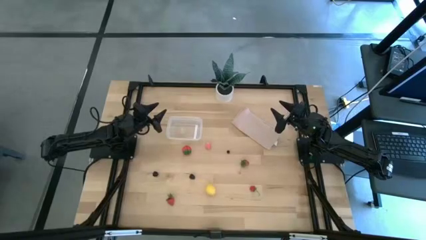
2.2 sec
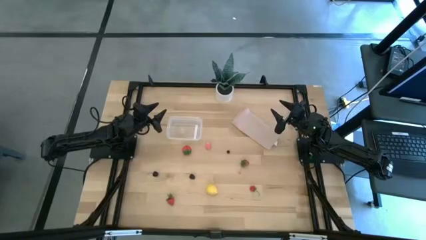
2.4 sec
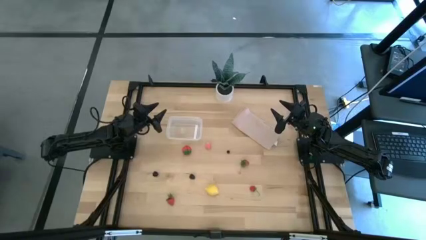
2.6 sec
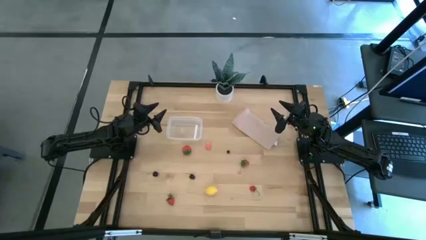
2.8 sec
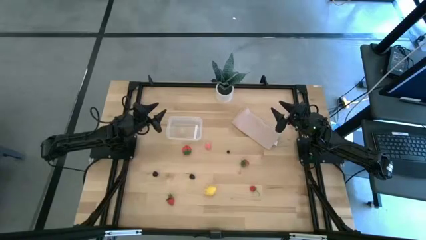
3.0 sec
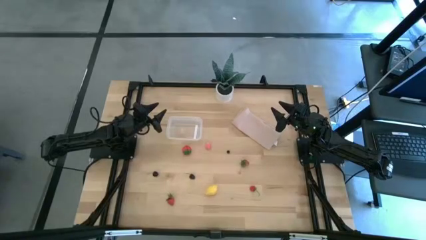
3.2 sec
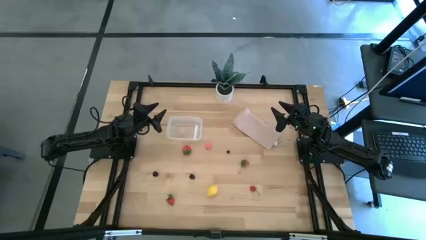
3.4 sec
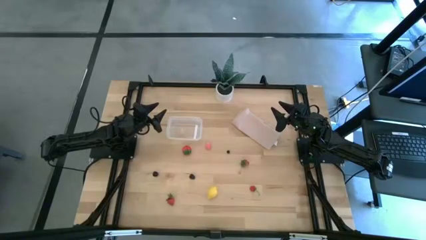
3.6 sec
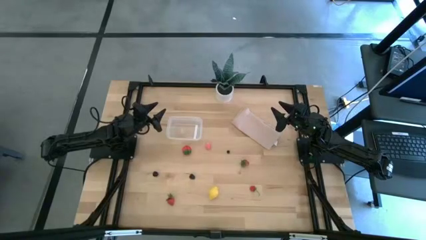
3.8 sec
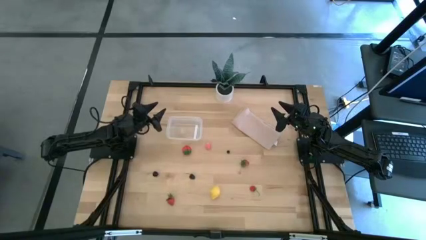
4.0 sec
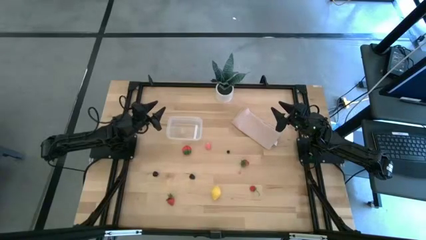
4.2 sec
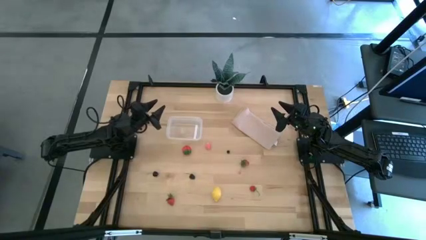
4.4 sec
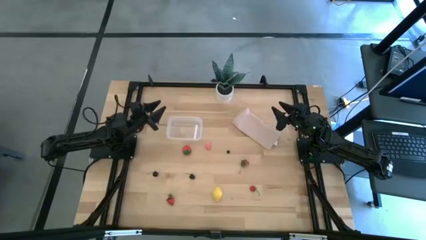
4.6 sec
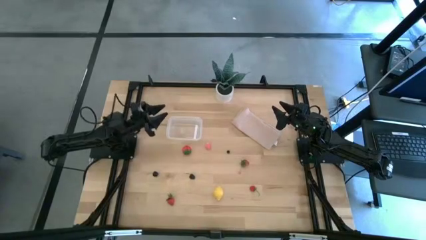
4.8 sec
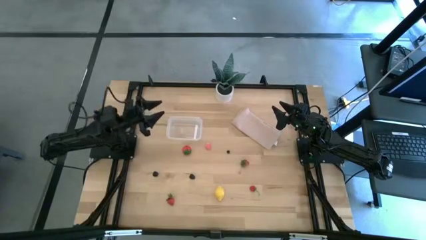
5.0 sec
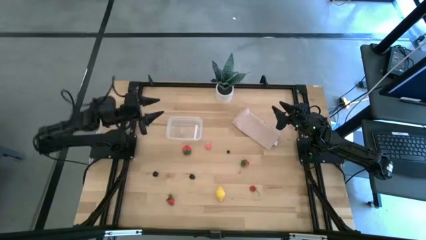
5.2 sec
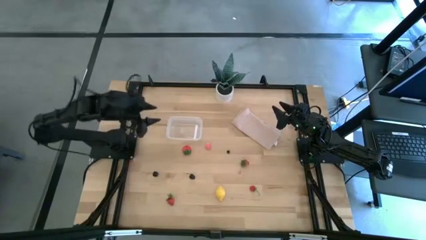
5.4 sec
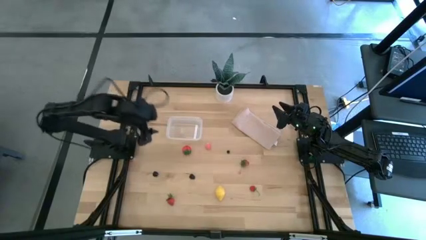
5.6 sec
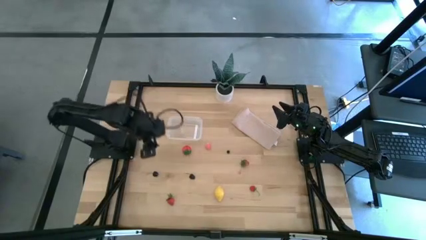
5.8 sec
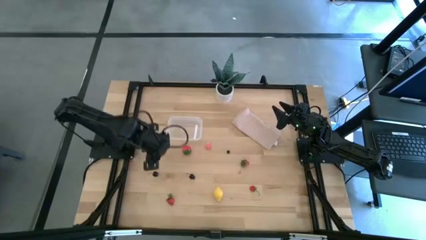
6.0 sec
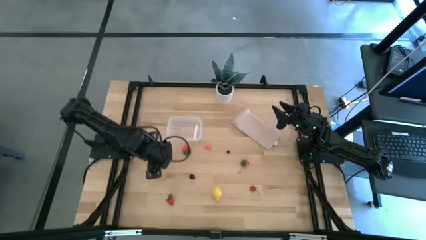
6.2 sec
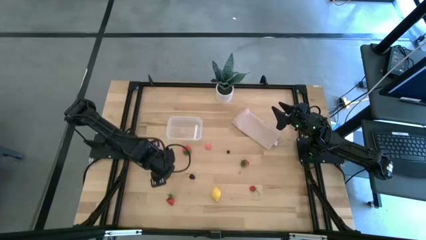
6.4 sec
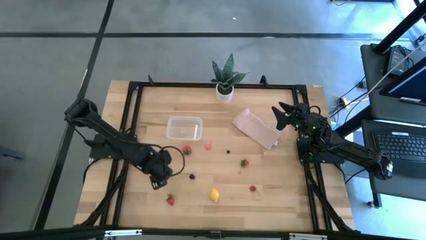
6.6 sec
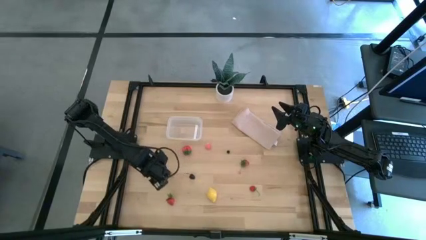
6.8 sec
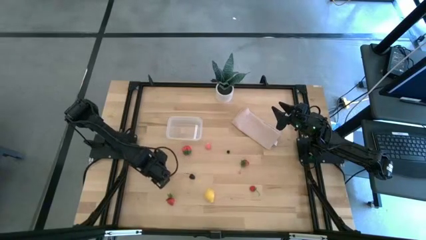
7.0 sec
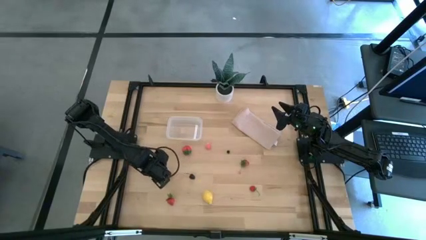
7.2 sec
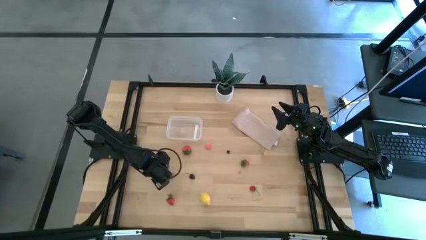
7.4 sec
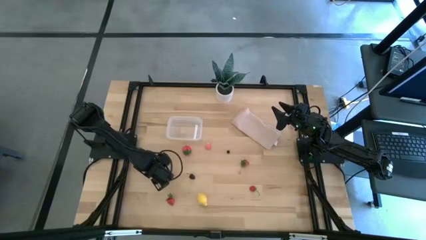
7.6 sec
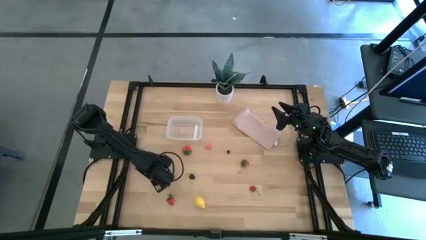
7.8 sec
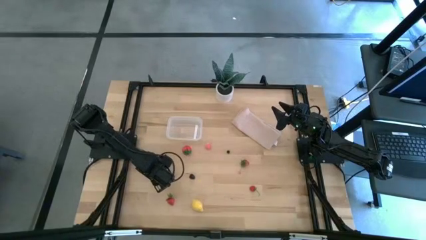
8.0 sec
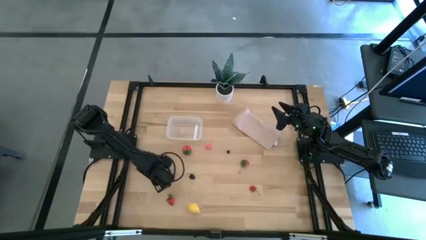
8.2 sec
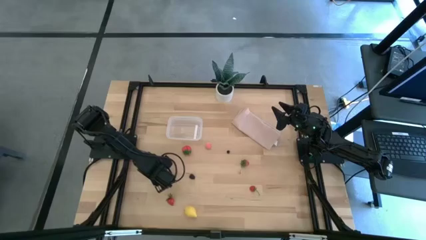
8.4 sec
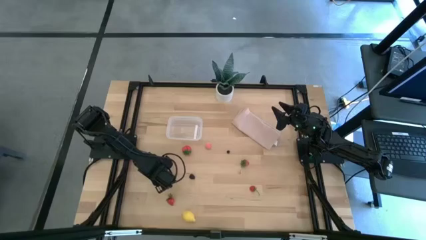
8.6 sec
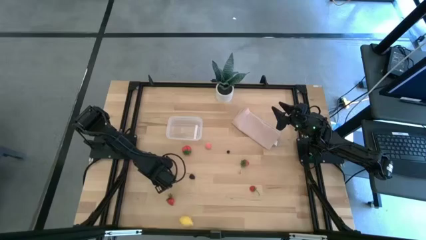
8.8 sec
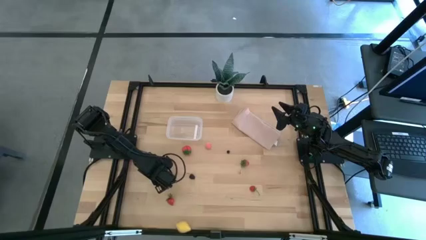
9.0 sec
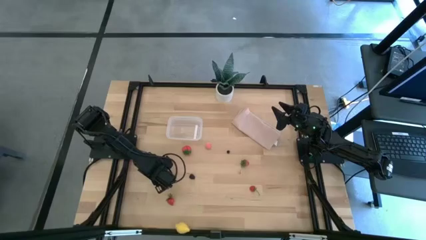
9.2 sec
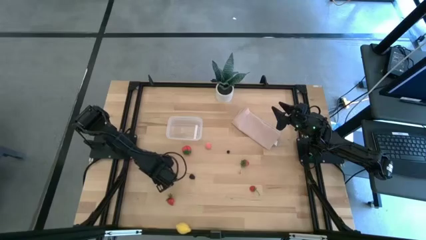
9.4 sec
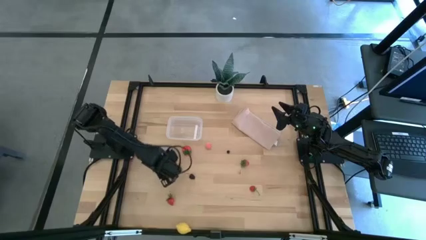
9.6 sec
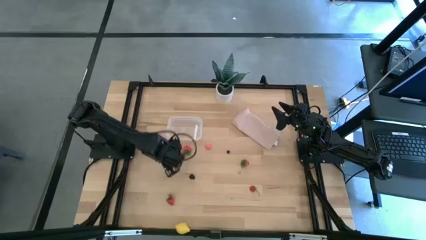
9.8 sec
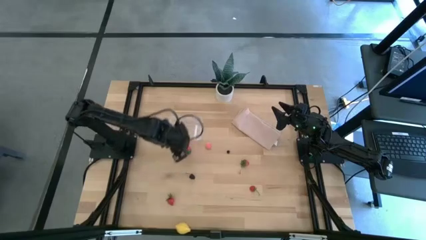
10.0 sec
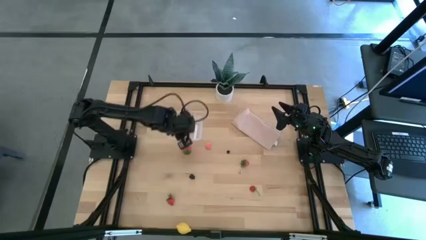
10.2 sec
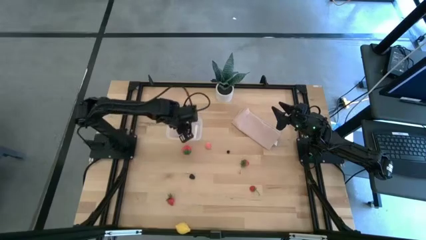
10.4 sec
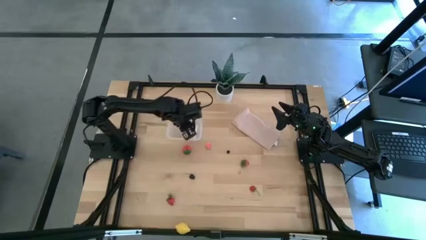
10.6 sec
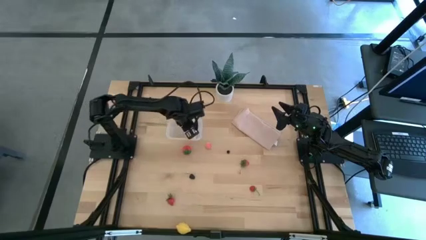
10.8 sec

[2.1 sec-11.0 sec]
Task: Pick and placing Produce into tupperware
Put the black cherry into the transparent container

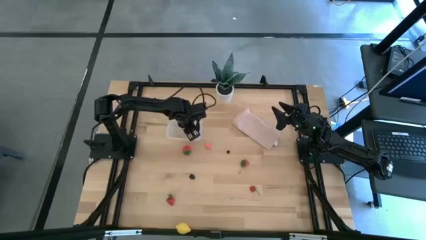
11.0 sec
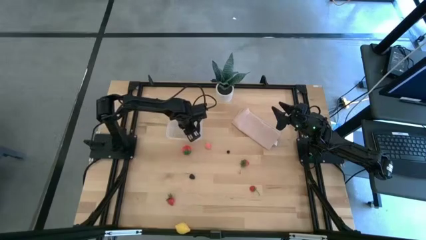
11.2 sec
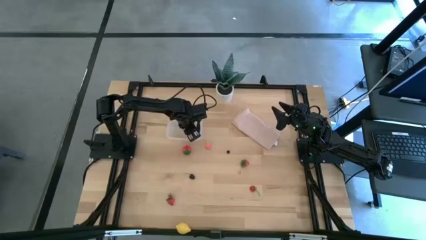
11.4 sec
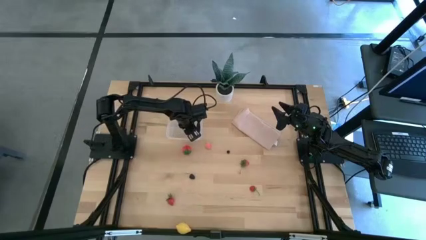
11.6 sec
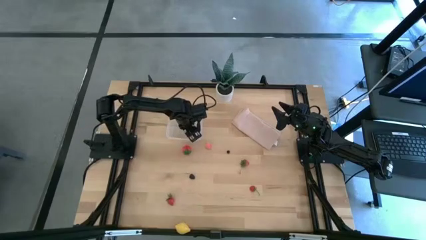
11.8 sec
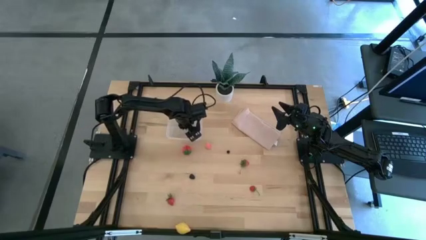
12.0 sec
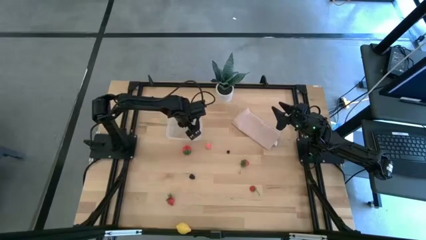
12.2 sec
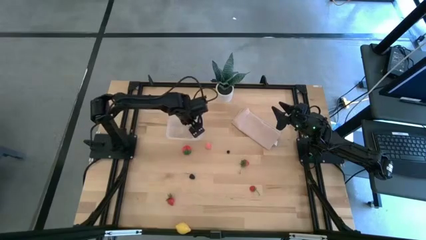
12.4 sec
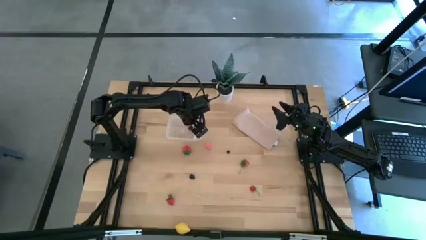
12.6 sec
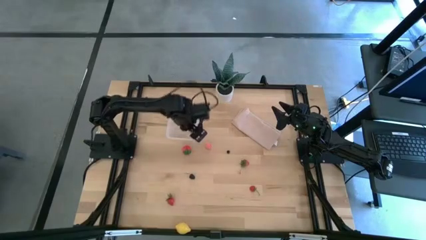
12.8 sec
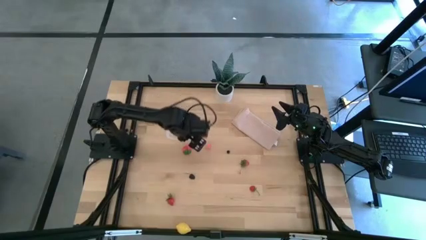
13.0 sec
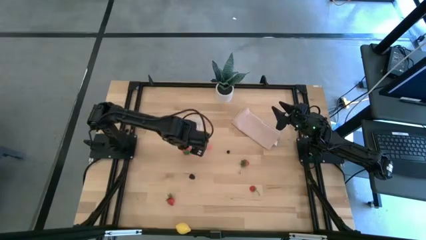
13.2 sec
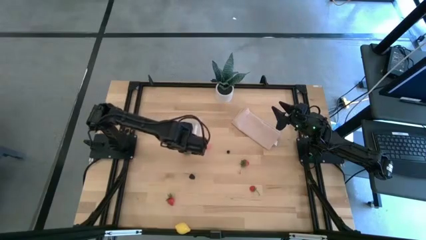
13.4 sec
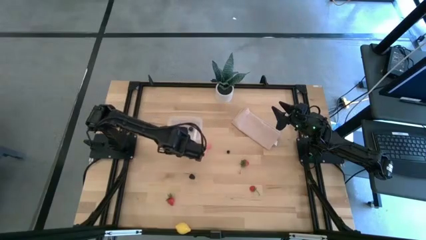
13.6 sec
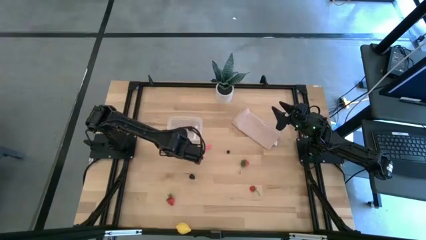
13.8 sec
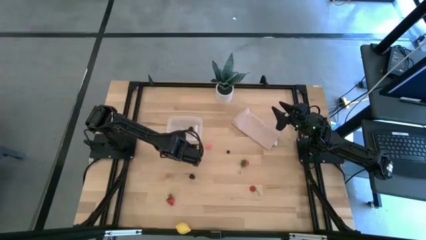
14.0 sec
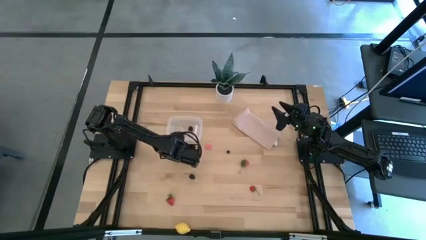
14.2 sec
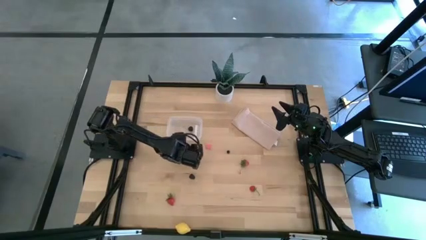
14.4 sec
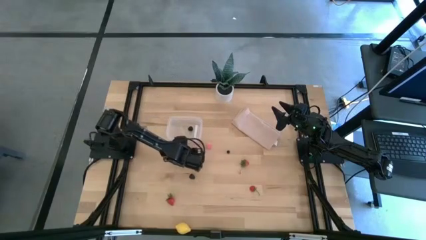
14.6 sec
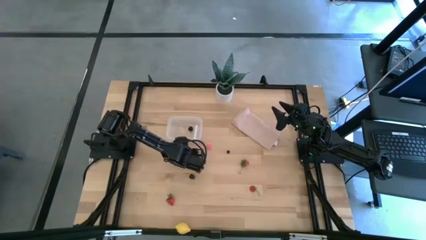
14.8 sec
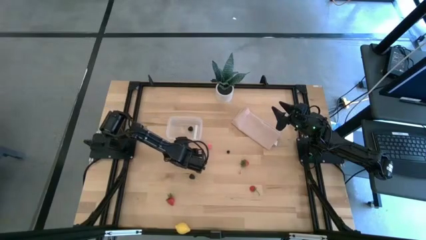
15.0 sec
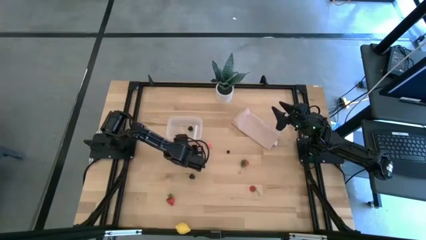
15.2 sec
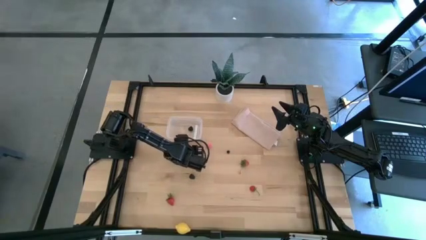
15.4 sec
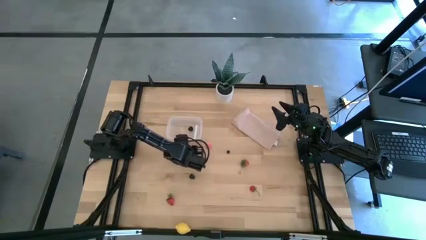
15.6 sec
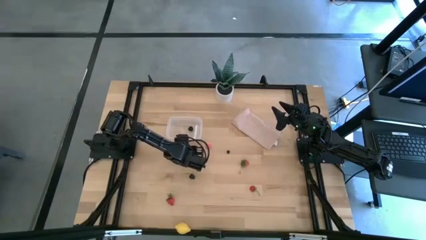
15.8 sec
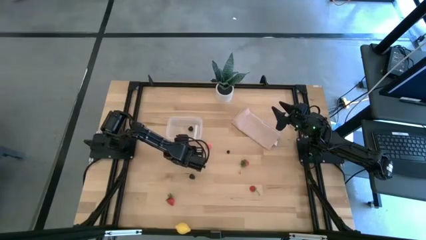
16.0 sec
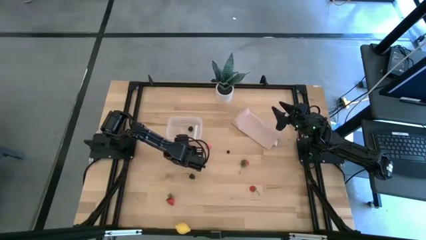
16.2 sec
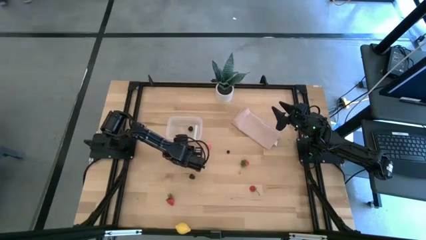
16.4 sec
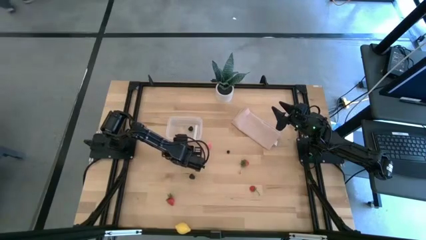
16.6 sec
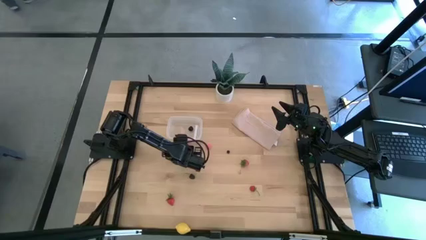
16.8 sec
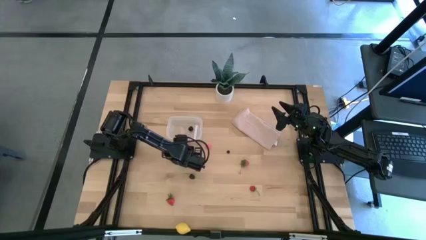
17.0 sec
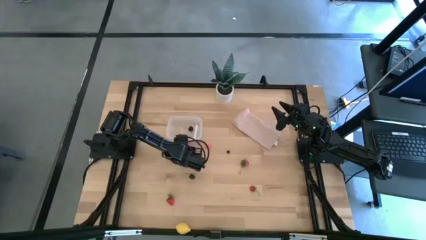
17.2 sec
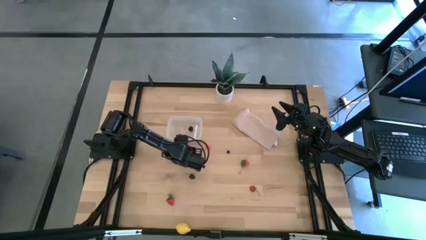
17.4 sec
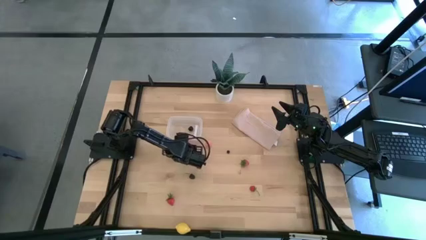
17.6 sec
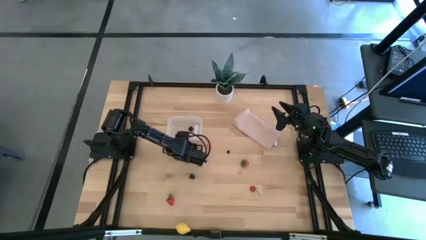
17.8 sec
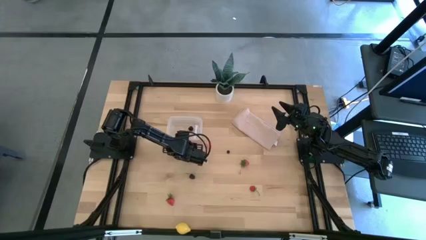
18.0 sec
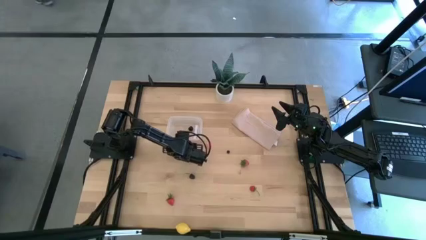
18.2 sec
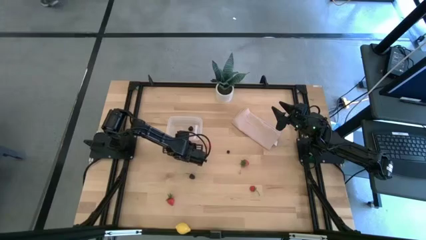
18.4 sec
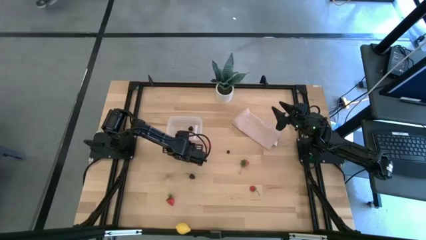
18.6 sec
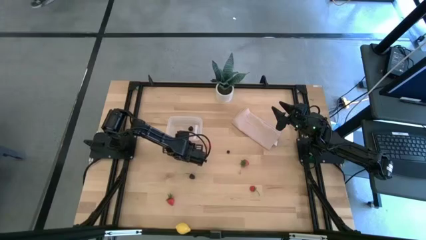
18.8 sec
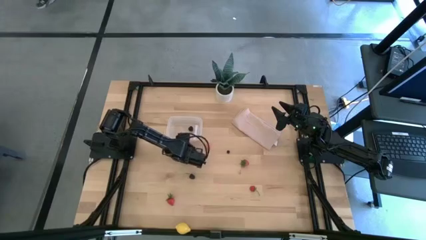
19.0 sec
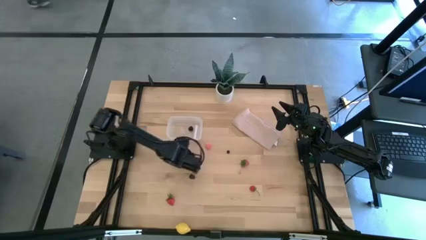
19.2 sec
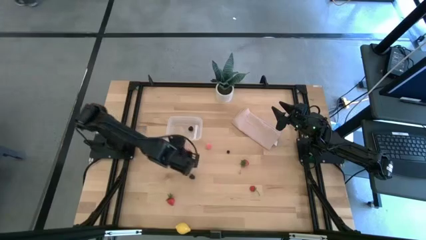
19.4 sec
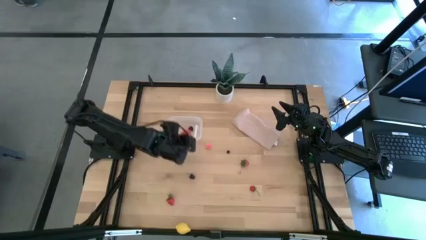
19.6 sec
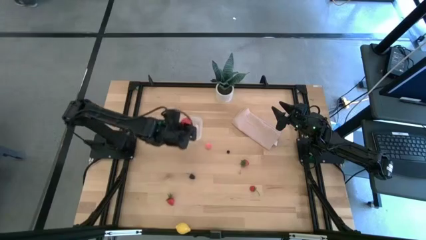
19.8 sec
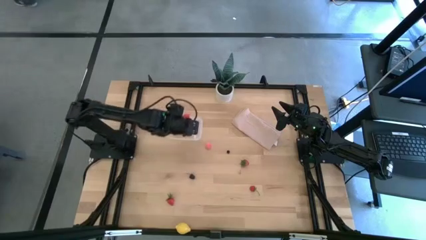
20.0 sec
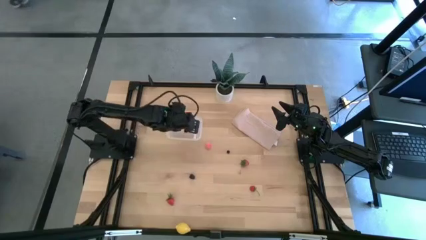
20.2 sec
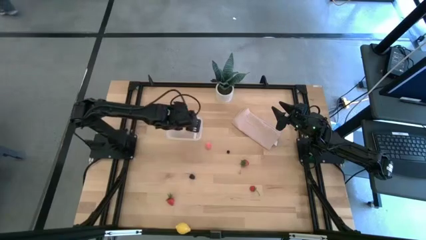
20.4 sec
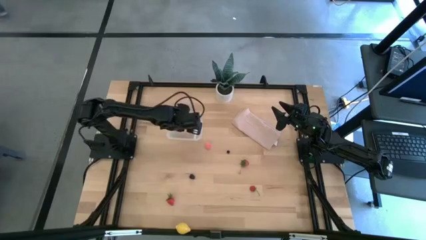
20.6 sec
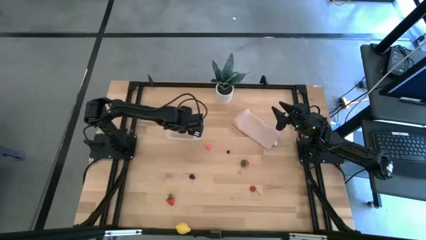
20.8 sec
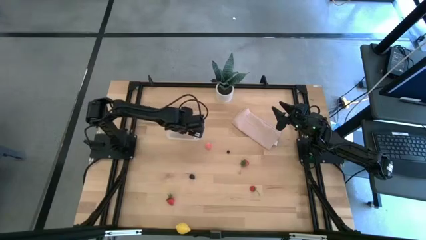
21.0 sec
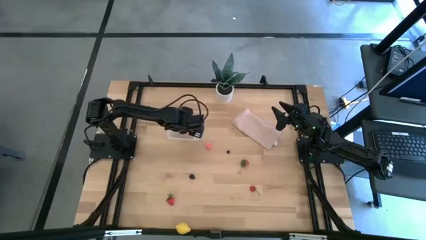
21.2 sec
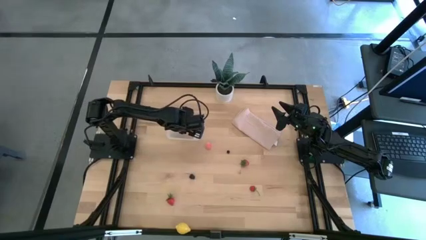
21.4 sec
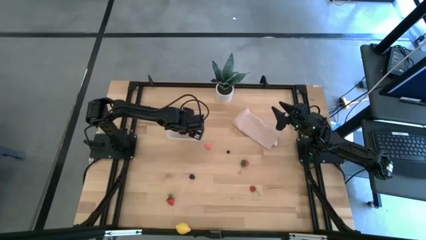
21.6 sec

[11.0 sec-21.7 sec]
Put the red strawberry into the transparent container
